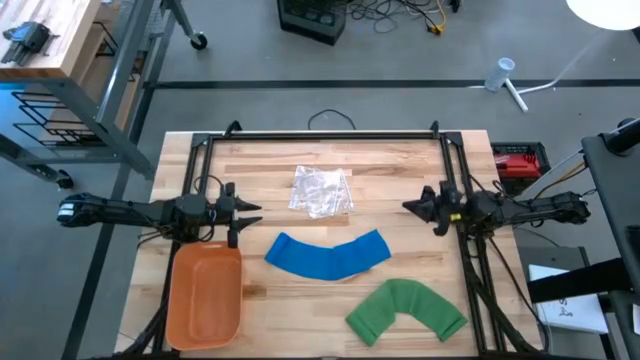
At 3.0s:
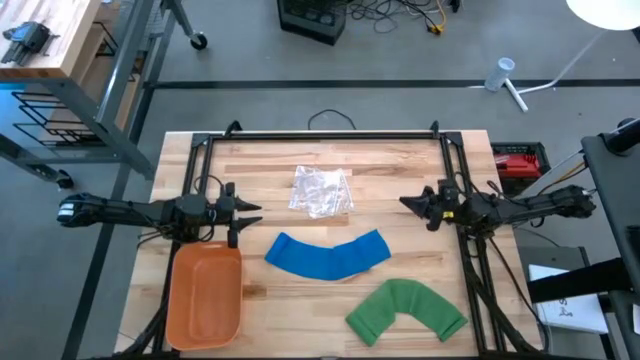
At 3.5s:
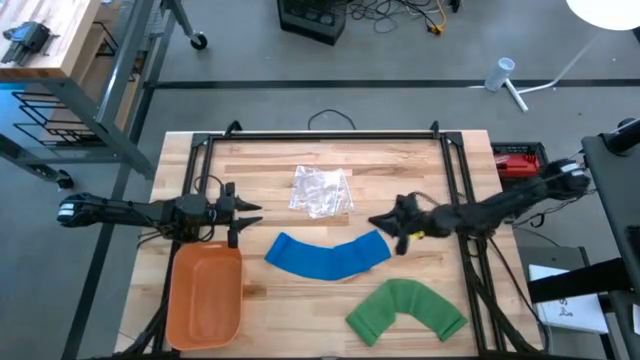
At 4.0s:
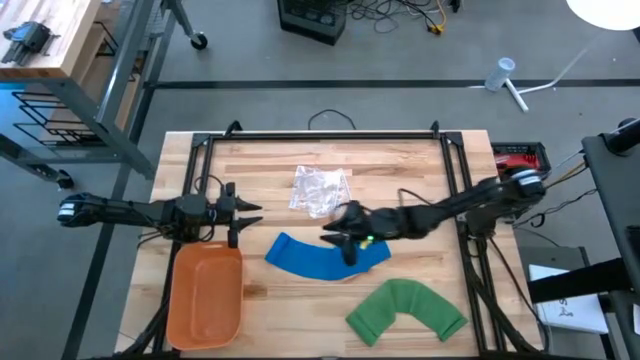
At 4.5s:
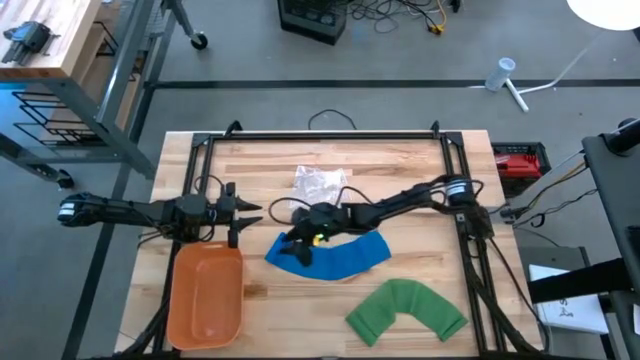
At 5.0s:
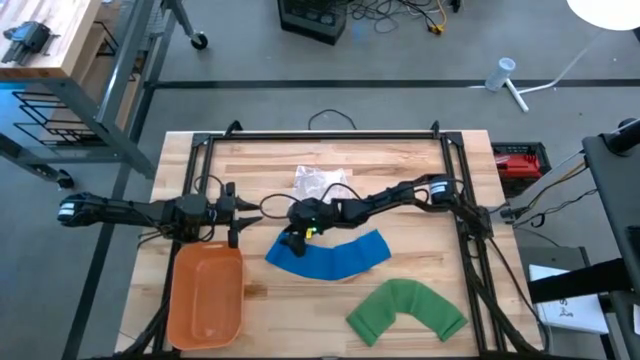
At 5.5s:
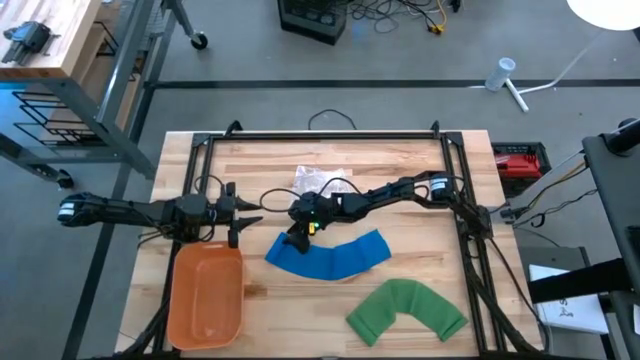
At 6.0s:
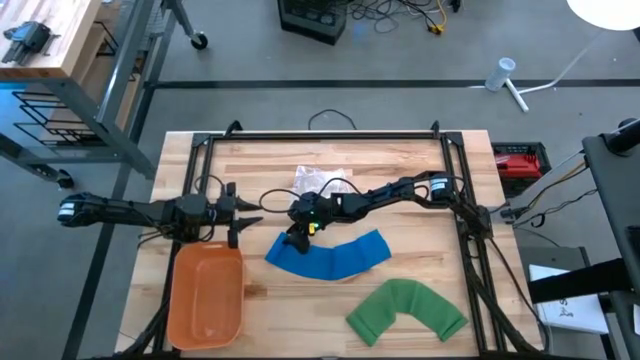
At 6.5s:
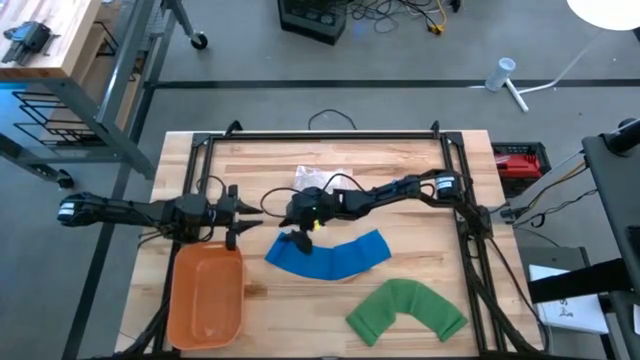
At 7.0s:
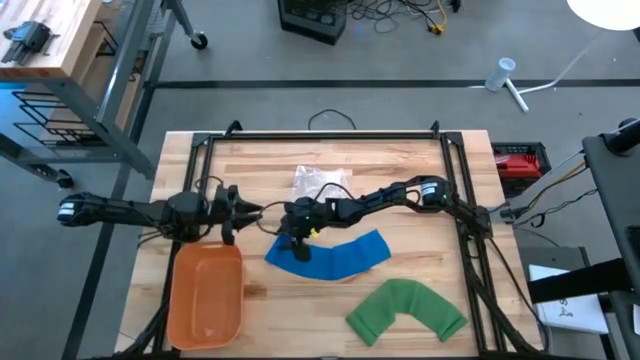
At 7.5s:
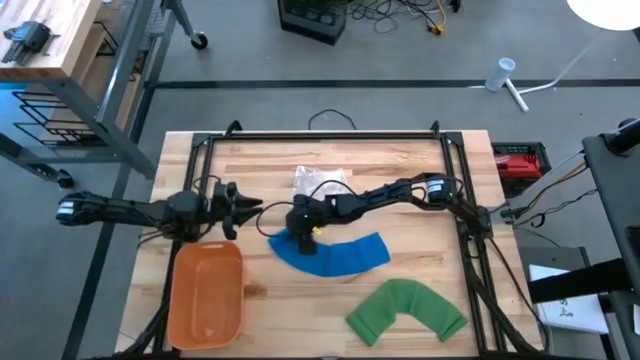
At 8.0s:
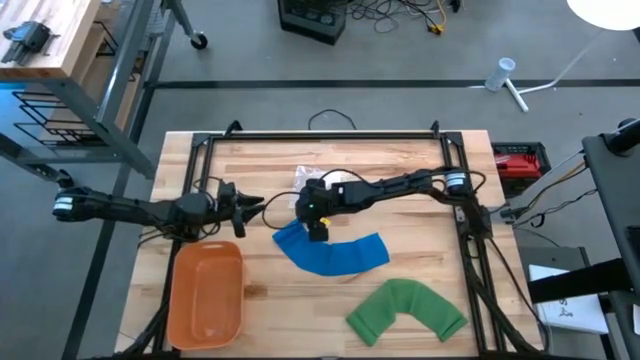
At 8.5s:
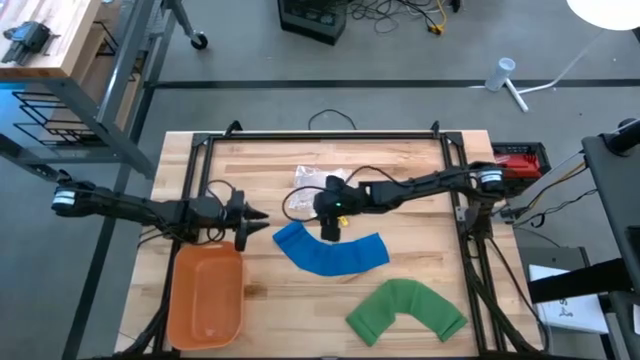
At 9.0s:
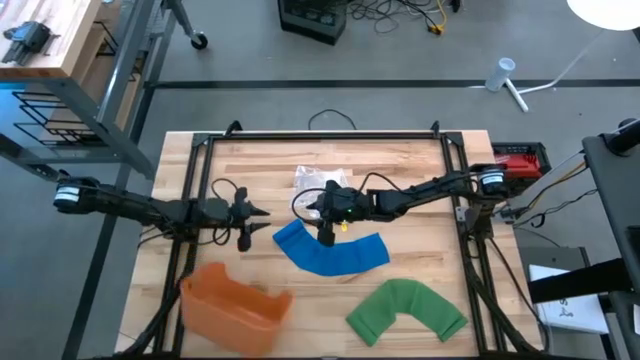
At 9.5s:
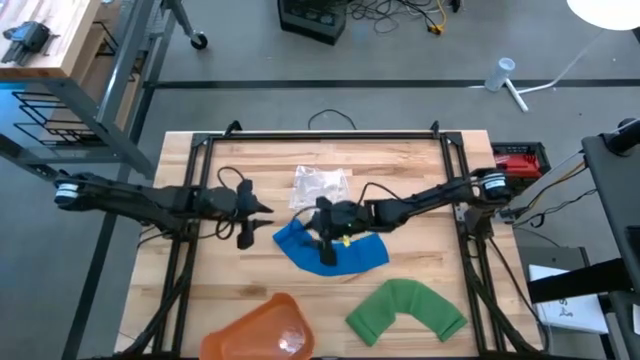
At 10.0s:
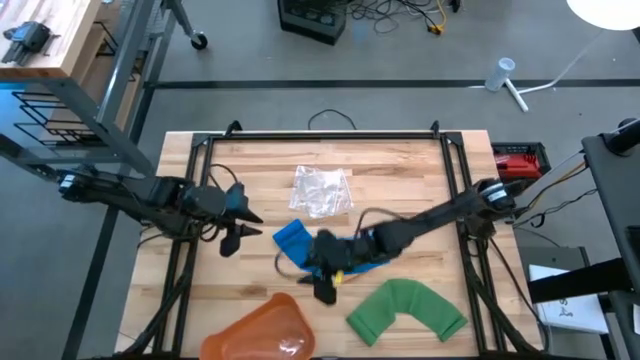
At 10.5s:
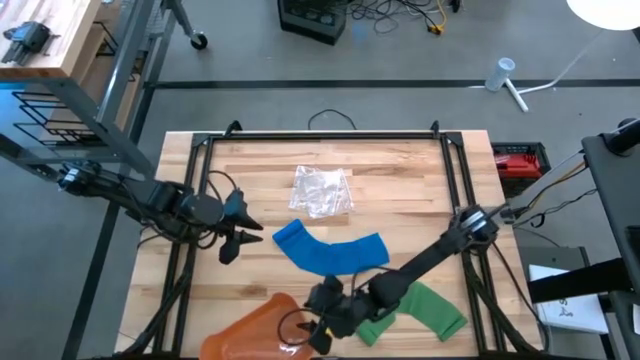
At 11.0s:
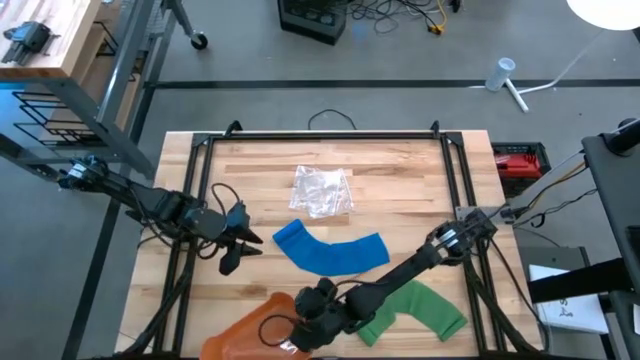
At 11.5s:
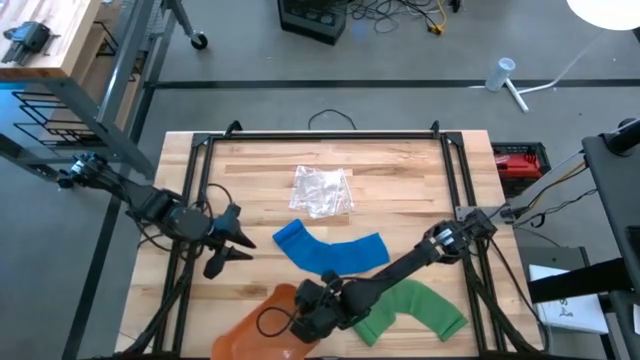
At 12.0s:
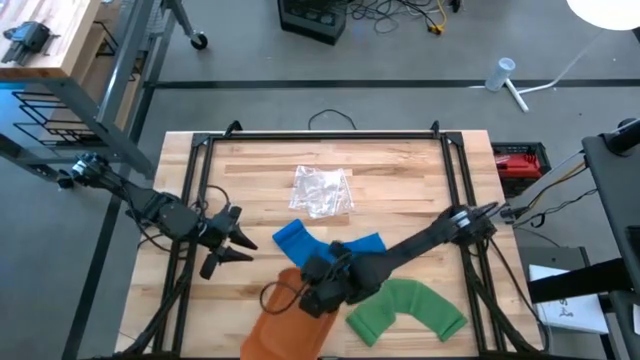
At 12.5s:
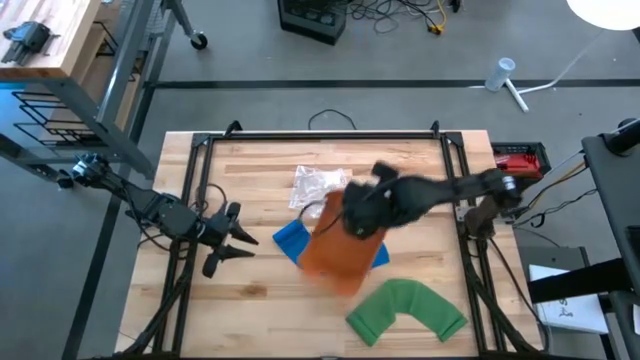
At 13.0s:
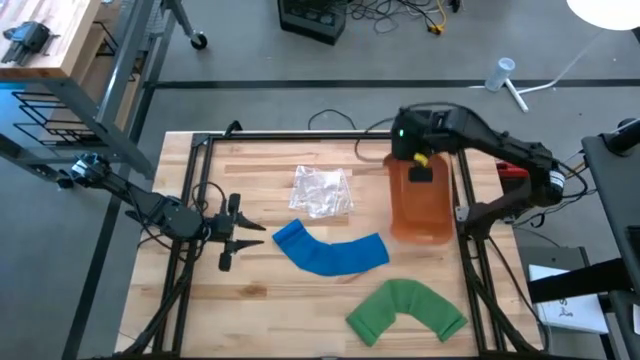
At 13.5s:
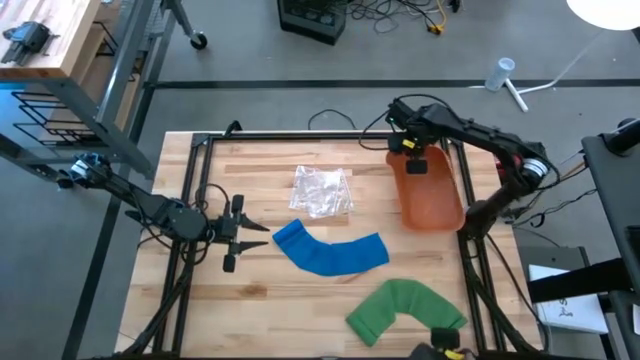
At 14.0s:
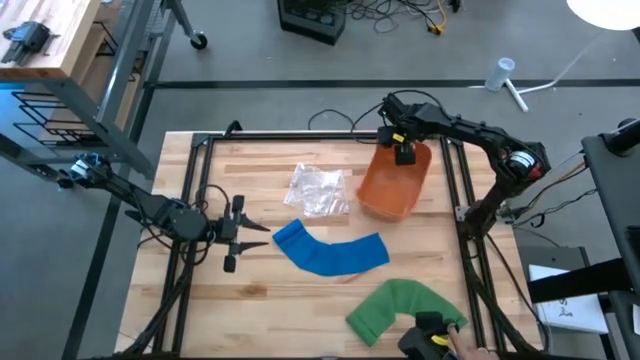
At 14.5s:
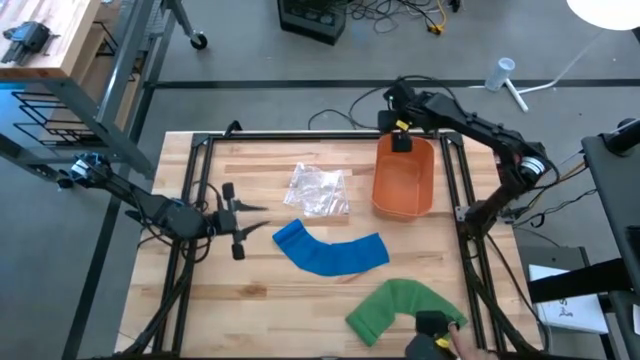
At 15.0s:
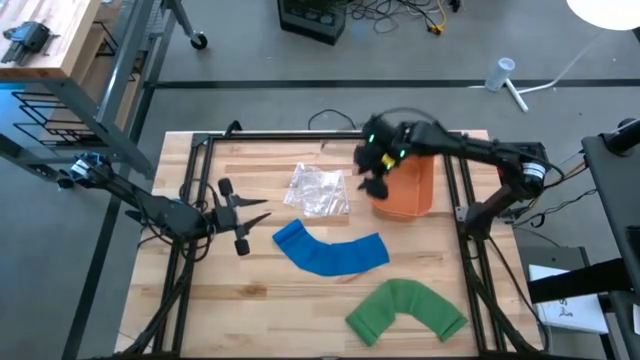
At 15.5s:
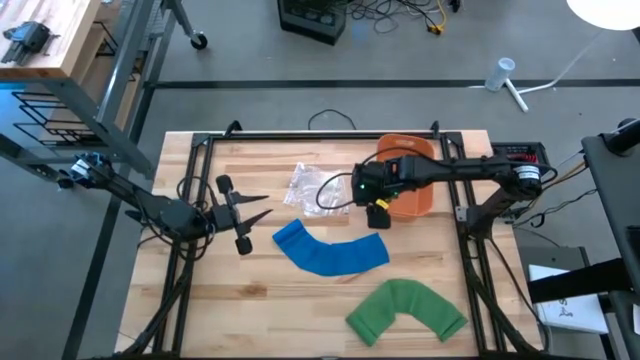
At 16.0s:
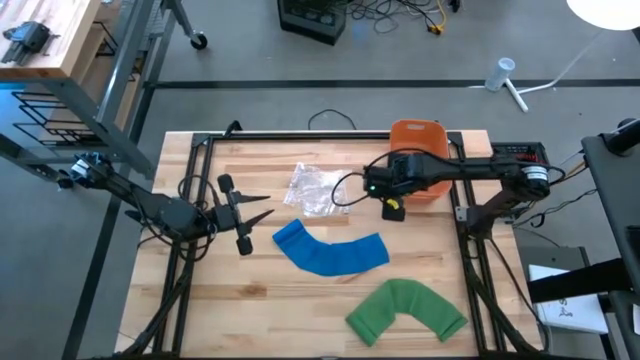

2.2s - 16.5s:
Task: Roll bandage
Move the orange bin to the top of the table
